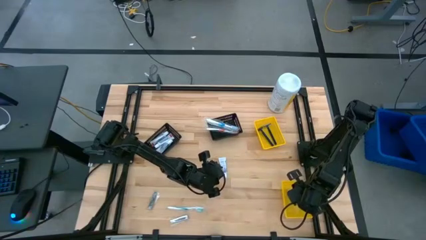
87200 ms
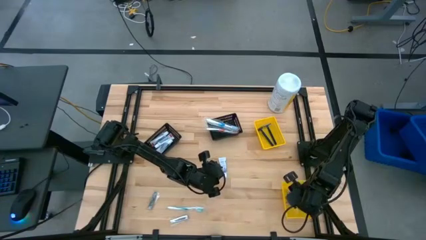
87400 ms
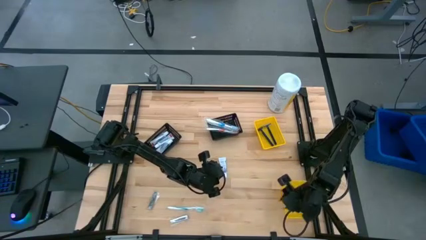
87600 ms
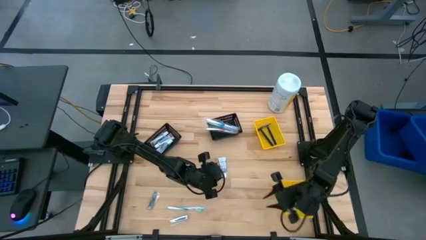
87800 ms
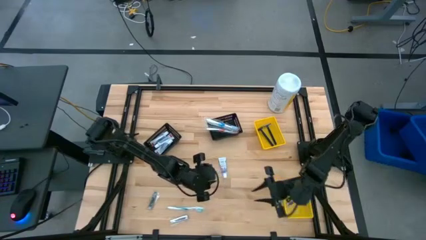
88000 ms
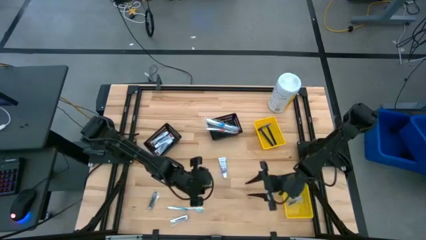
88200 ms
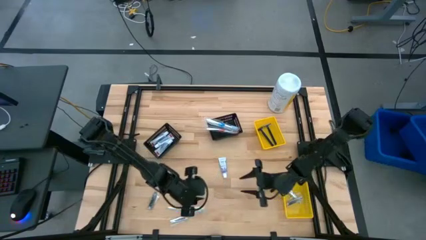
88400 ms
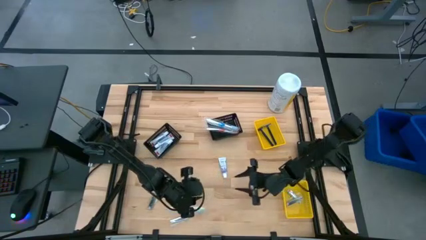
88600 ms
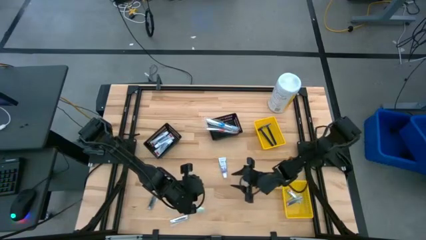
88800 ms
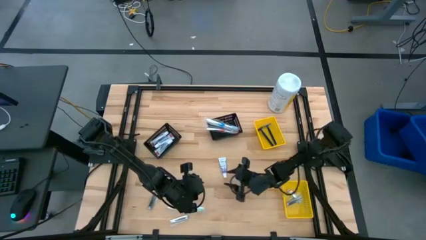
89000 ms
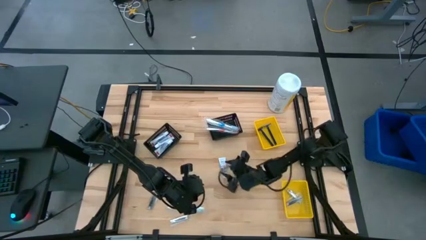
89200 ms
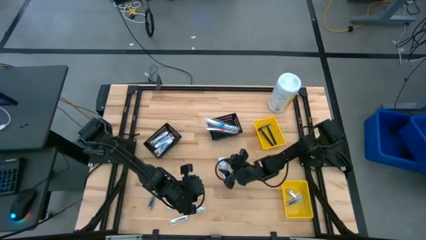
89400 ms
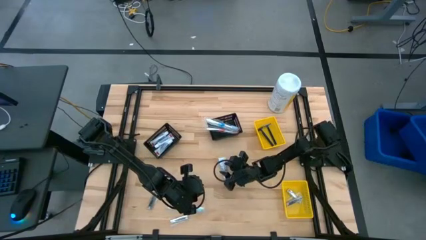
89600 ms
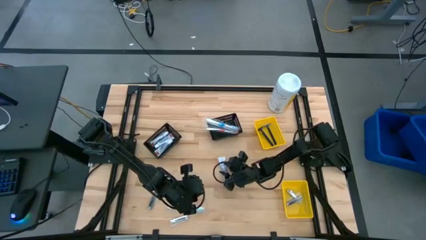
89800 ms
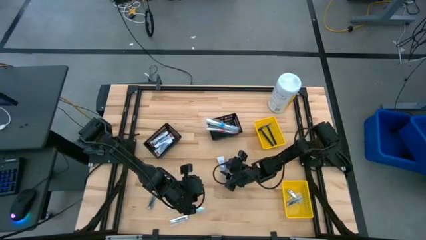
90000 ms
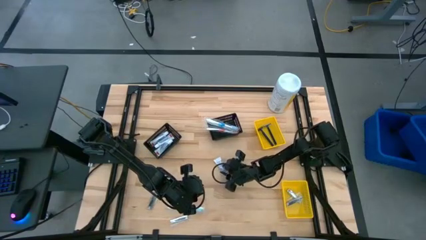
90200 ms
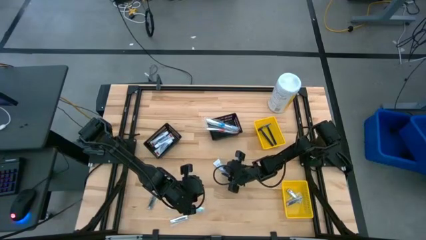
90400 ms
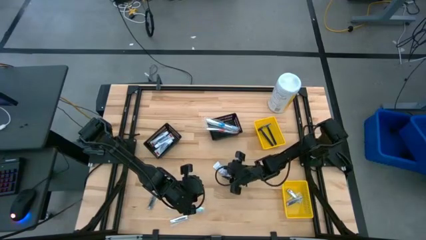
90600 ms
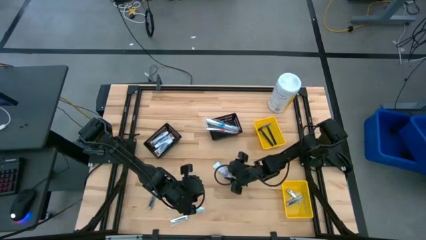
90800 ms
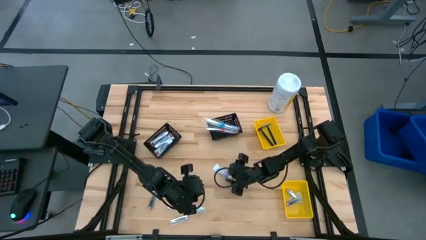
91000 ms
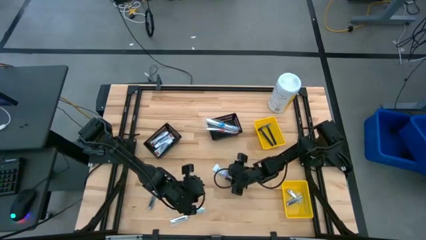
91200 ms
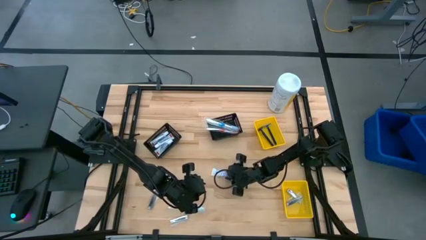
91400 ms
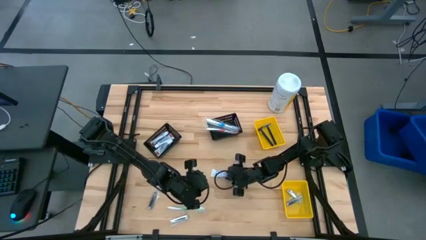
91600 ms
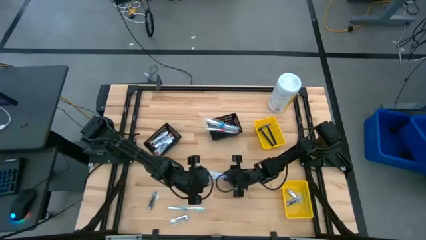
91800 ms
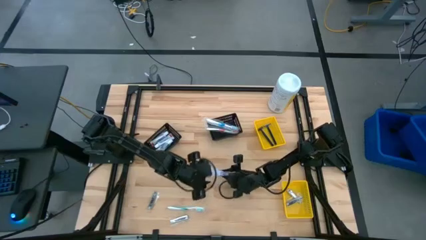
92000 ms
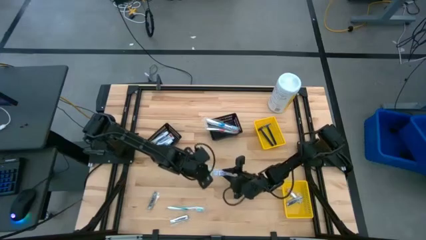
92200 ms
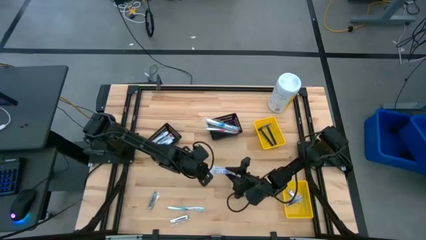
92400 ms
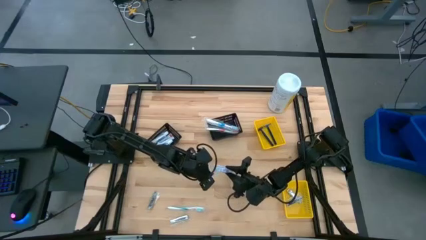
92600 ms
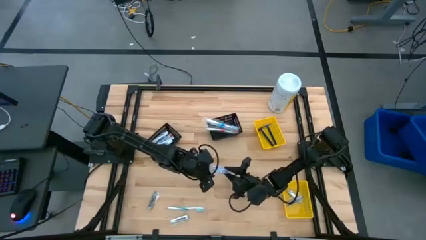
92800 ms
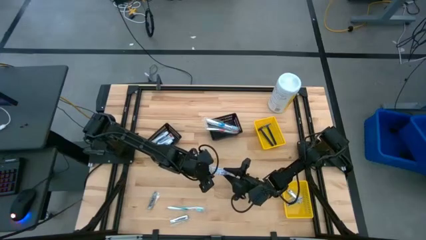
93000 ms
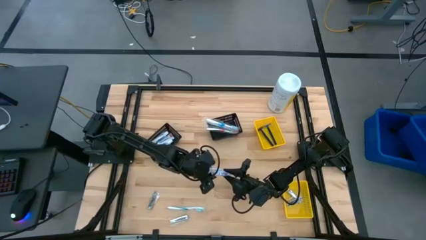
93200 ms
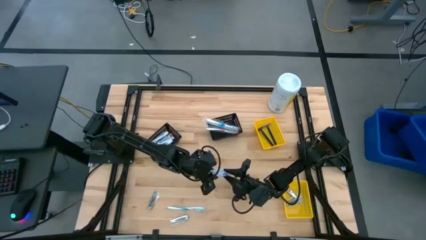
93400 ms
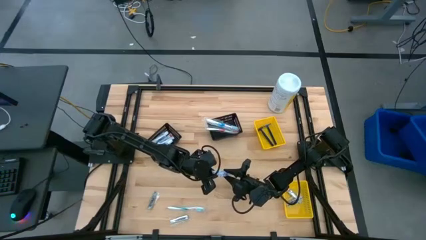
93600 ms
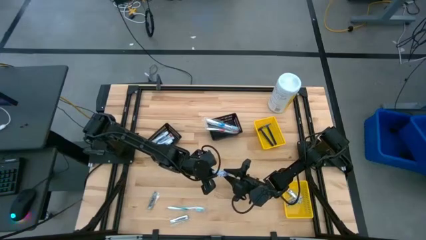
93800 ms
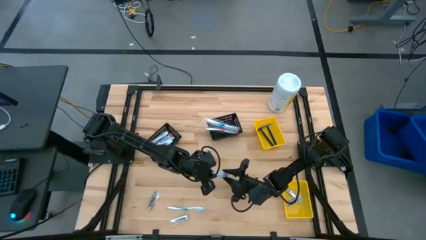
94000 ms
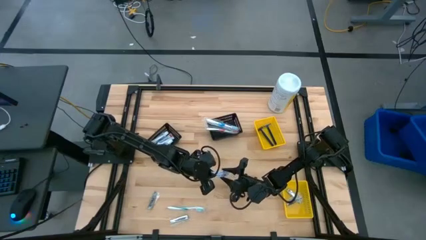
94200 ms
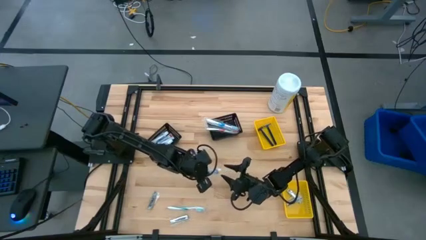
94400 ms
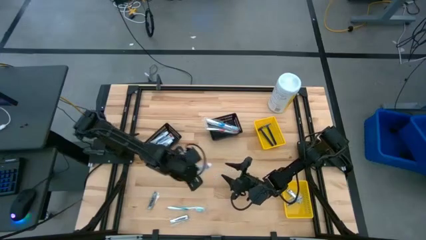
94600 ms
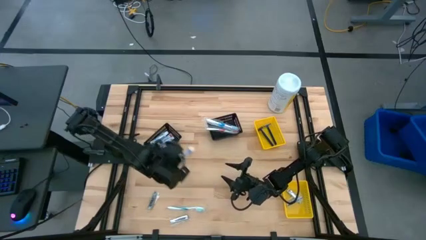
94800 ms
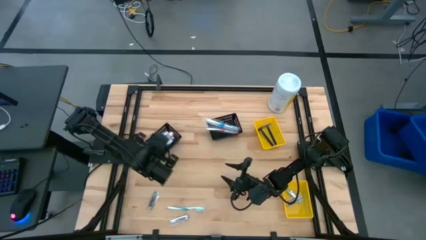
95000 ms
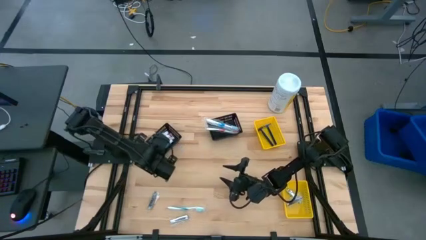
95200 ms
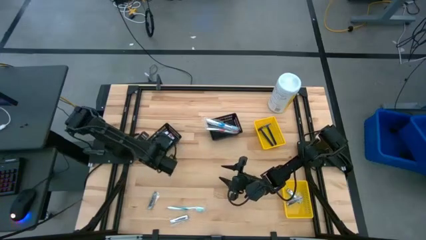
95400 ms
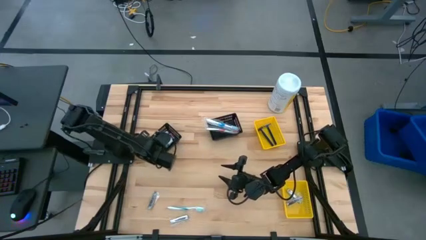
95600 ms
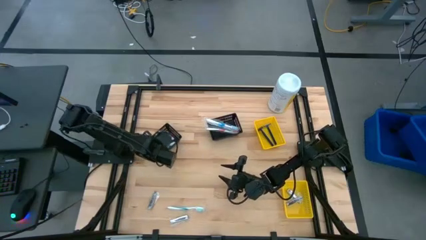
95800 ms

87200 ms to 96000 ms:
Task: Pick & Place Travel size toiletries
Put the white toothpaste into the left black basket

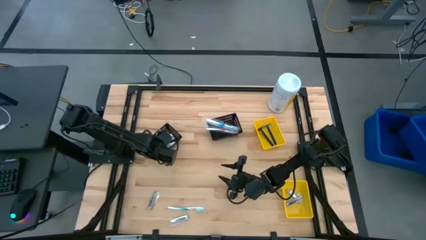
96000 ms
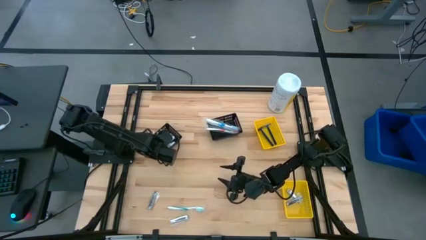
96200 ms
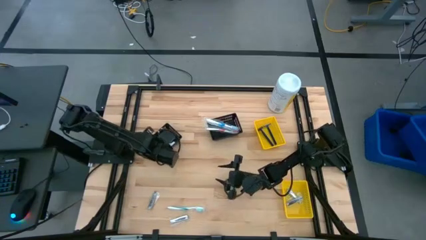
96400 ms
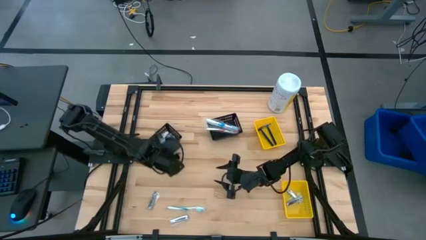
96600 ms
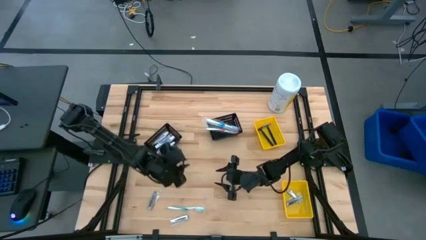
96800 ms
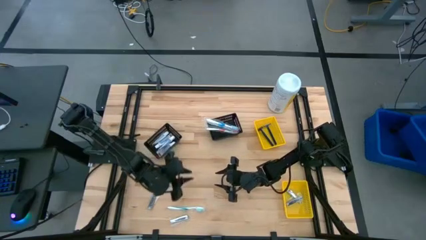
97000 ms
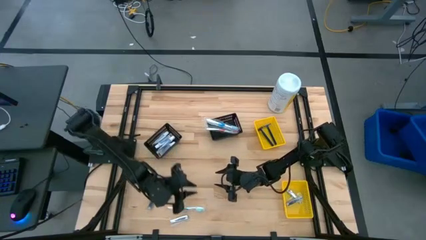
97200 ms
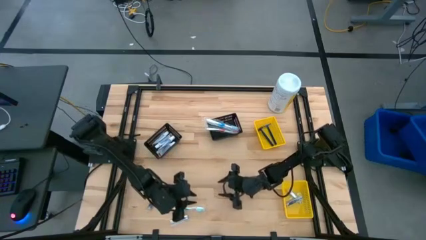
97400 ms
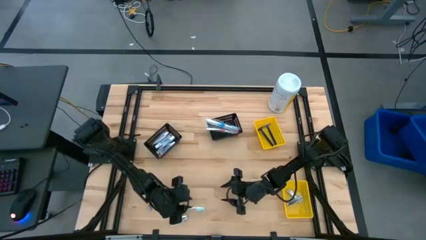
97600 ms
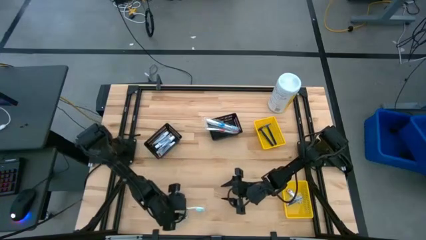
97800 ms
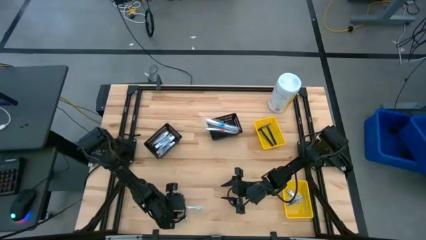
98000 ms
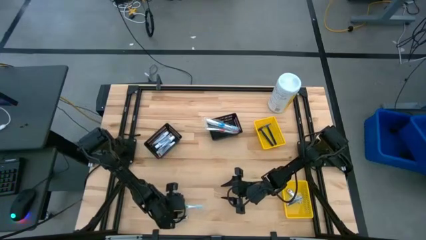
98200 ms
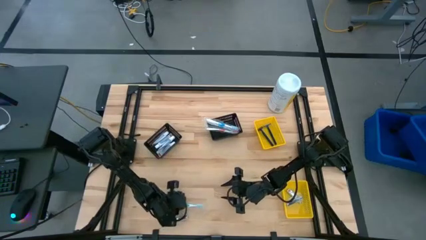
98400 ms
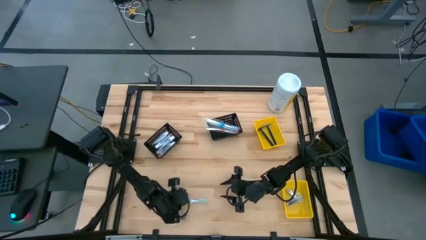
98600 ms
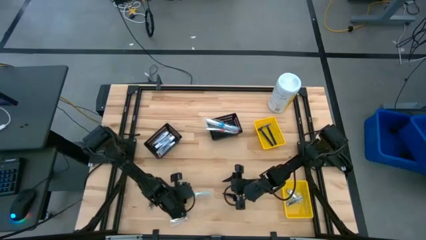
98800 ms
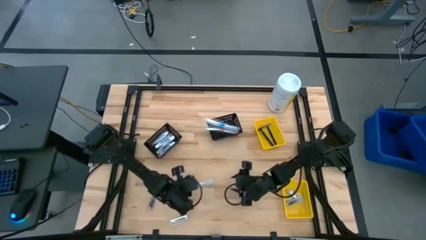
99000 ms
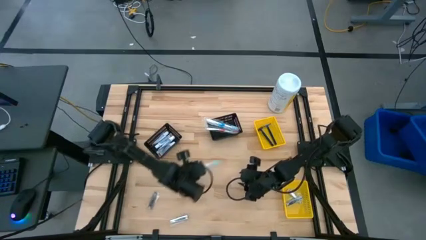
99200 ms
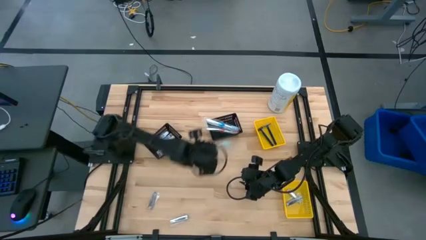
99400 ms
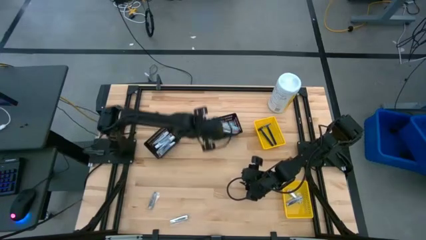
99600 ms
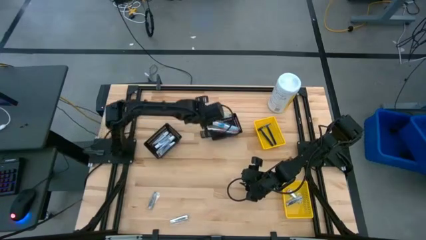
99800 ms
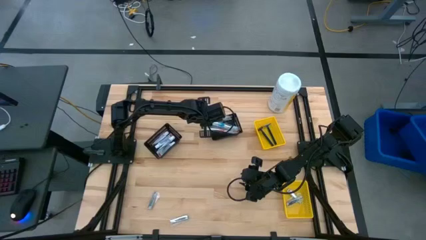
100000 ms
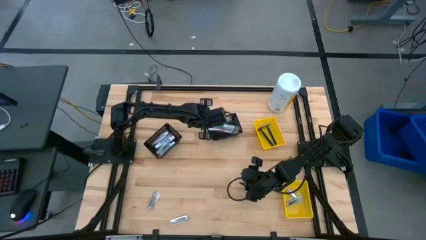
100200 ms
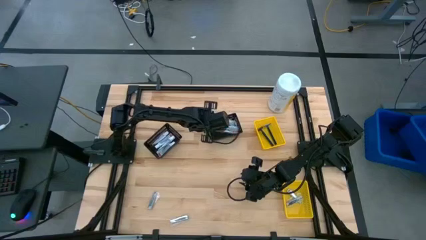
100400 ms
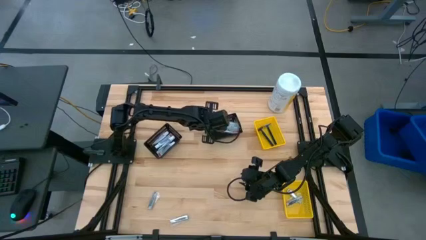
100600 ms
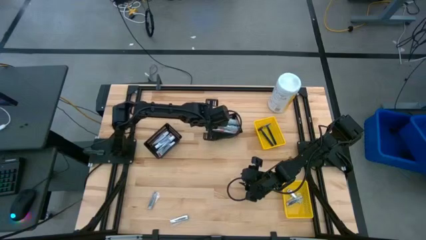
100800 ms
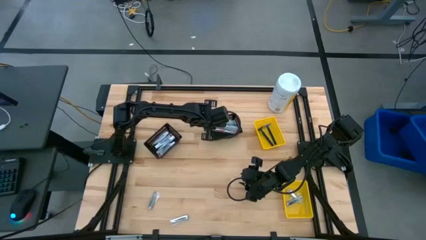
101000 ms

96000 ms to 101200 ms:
Put the green toothbrush into the right black basket
